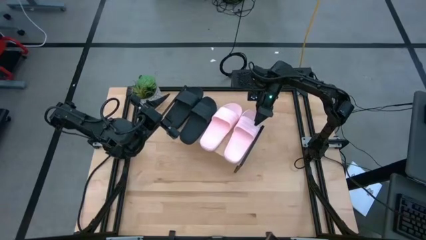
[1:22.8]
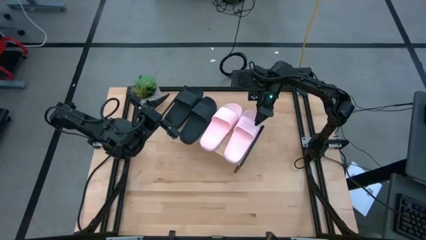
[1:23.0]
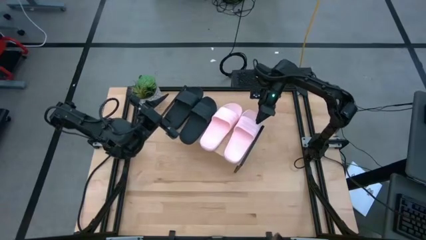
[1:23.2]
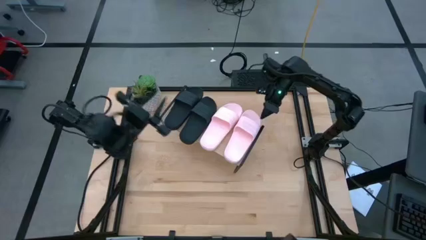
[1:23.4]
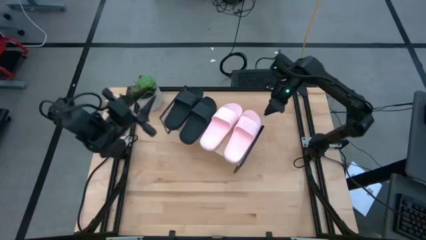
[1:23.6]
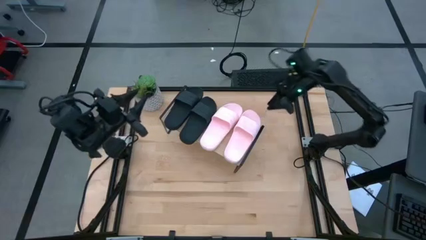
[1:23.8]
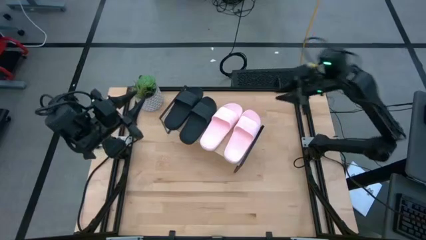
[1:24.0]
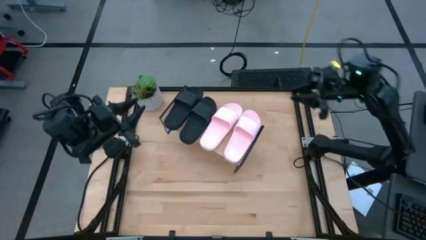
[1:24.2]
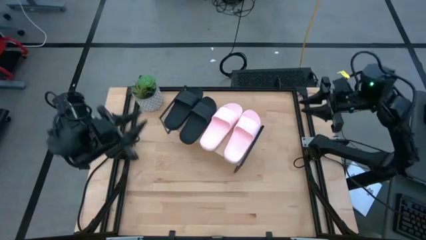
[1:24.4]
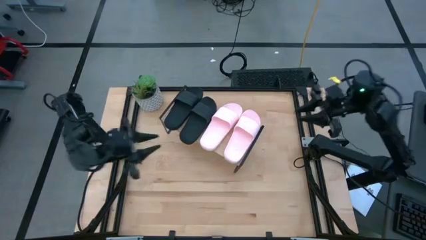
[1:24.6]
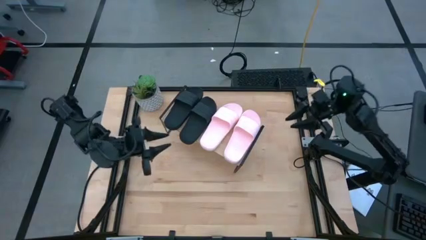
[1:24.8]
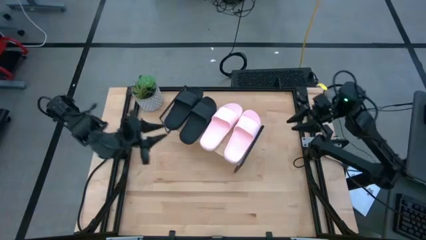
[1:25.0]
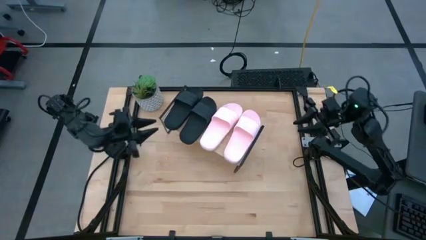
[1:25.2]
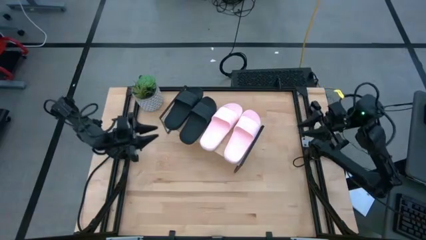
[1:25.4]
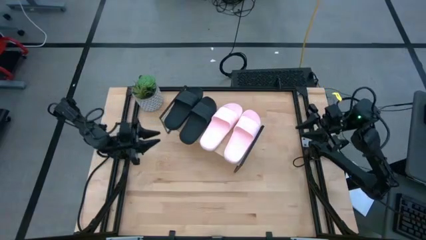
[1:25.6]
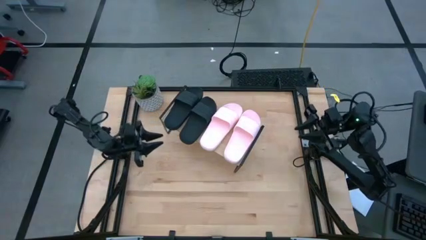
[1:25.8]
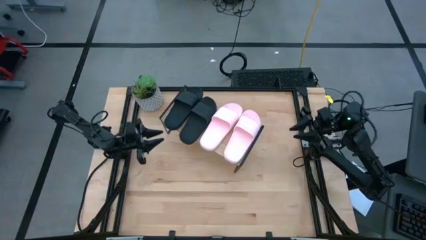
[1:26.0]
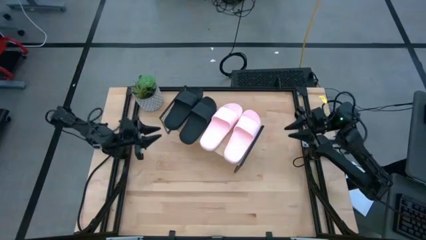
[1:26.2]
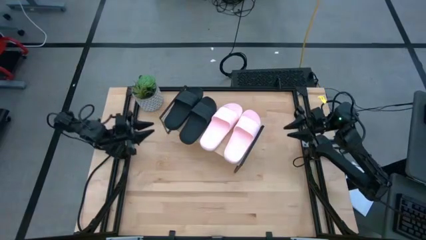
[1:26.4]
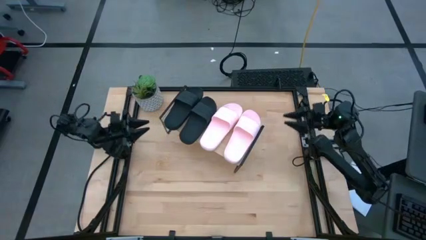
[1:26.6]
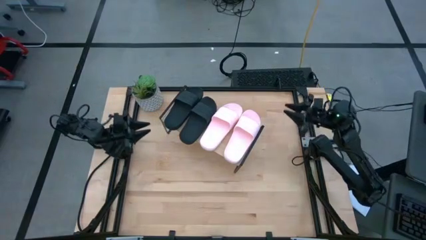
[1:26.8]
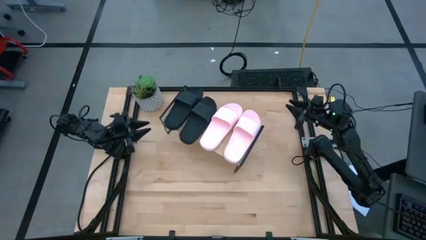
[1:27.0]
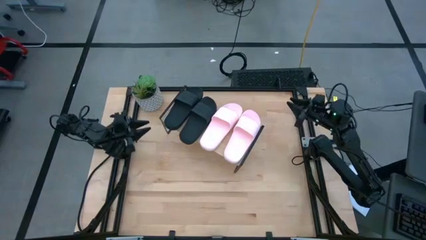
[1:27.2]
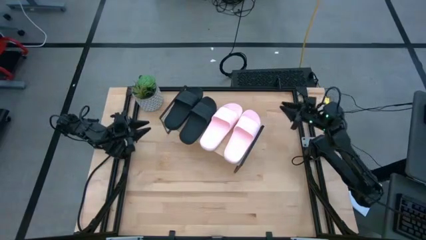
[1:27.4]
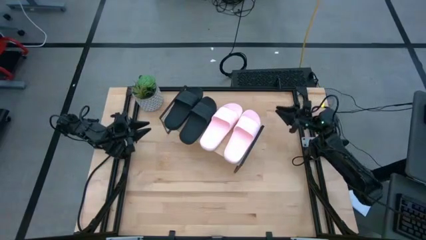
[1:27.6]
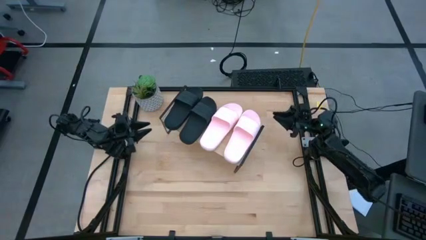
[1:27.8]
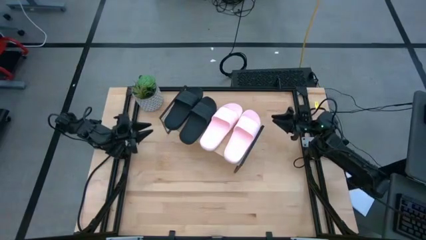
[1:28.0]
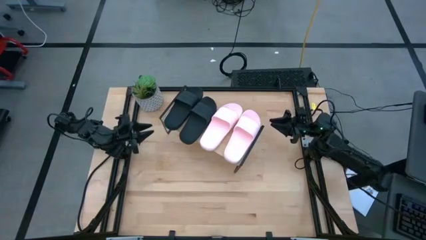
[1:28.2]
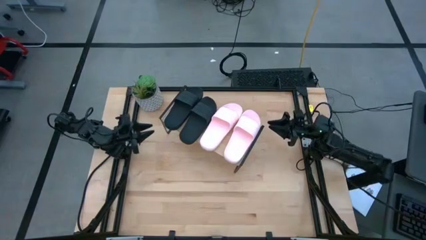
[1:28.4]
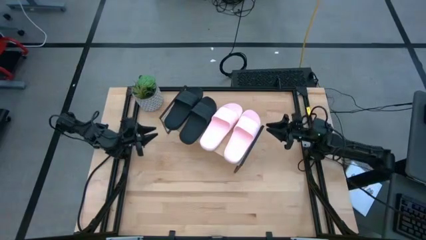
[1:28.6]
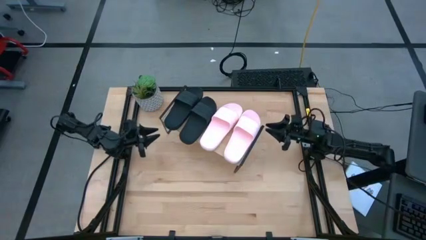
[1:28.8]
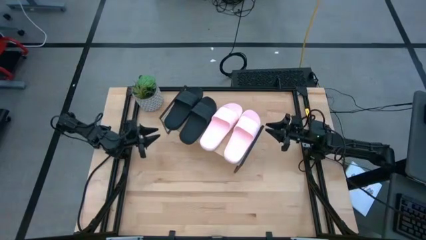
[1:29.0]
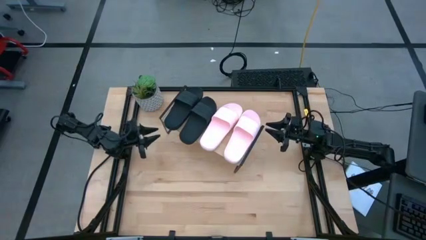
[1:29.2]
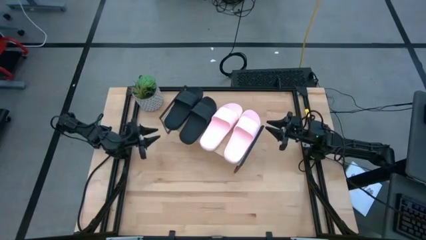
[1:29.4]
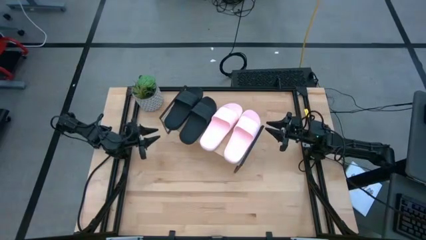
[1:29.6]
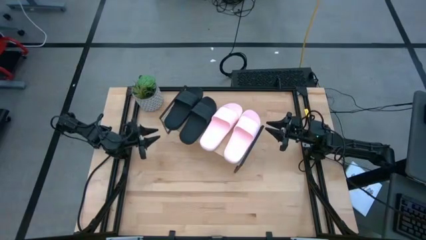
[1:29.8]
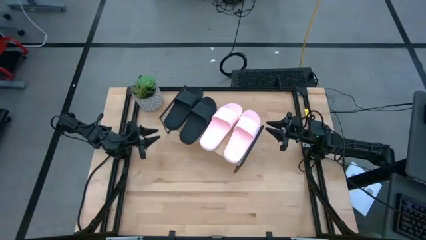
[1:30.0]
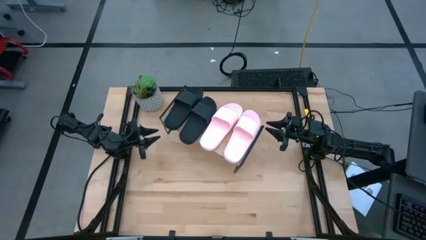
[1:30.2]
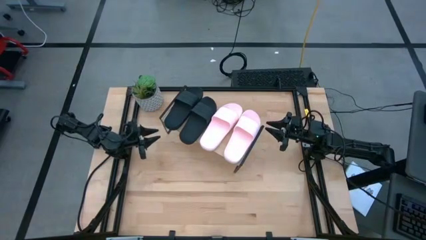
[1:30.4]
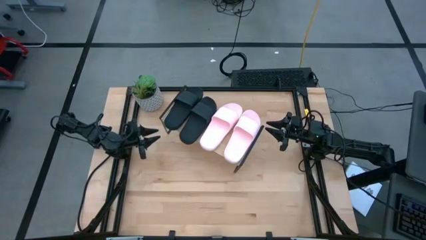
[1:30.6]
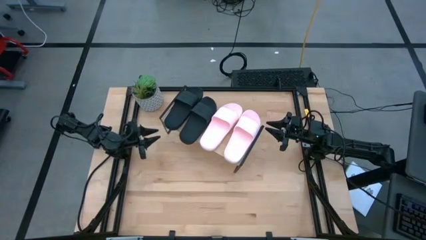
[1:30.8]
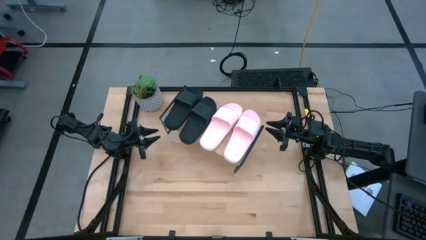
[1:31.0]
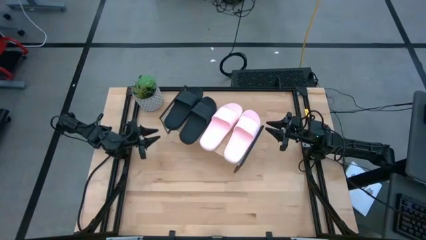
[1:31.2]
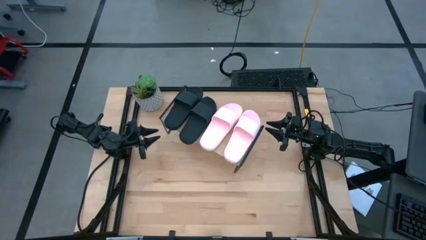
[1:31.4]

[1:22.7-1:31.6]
Task: Pick and place slides into the shelf
Return to Home Position

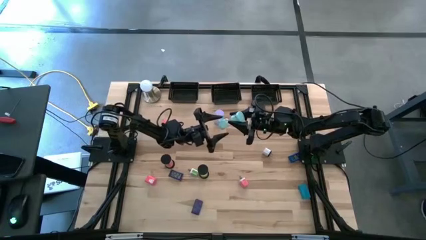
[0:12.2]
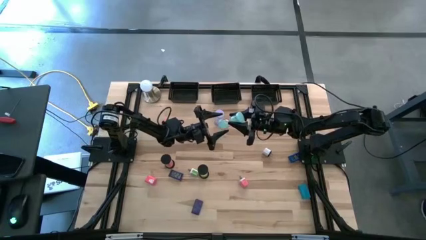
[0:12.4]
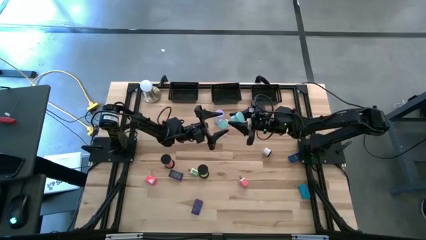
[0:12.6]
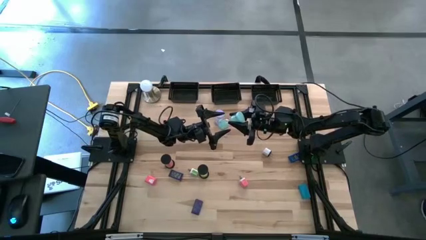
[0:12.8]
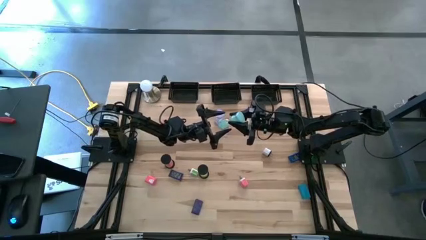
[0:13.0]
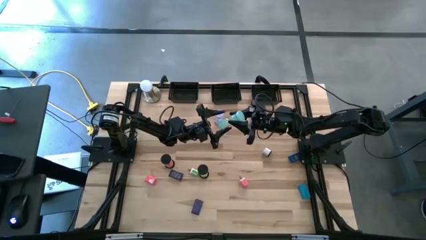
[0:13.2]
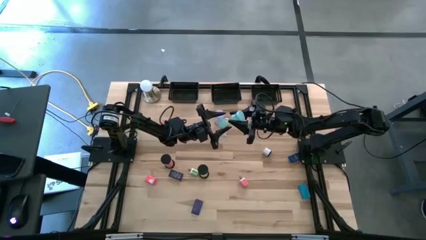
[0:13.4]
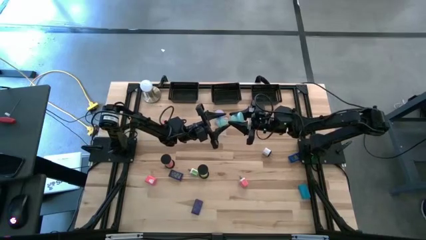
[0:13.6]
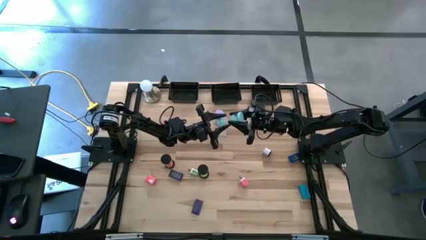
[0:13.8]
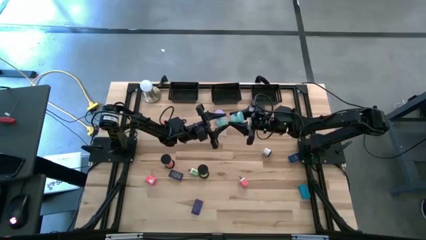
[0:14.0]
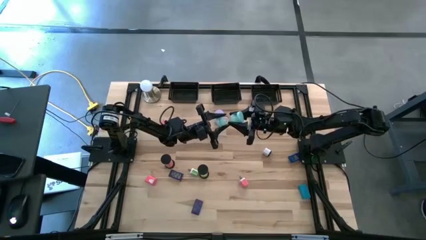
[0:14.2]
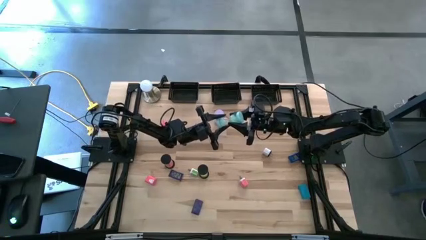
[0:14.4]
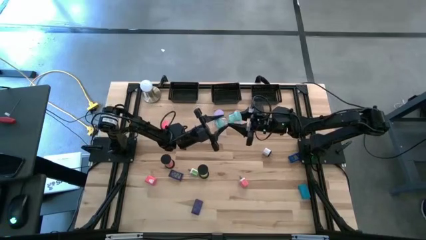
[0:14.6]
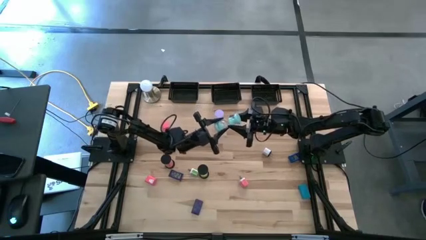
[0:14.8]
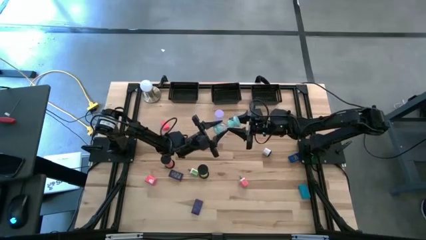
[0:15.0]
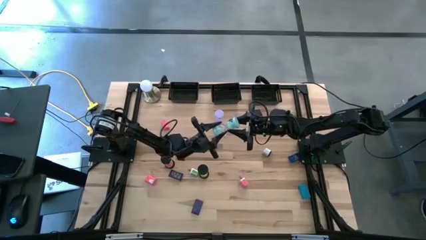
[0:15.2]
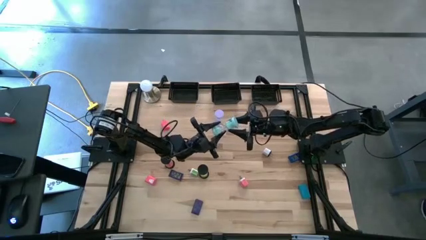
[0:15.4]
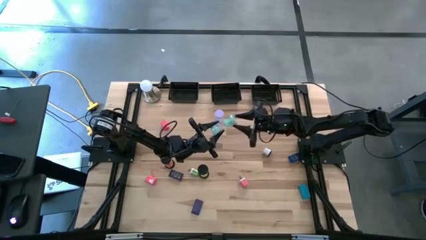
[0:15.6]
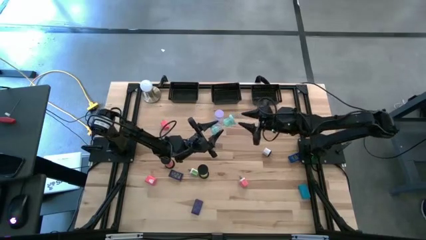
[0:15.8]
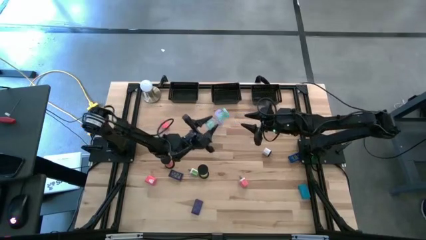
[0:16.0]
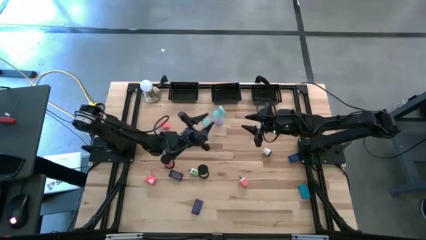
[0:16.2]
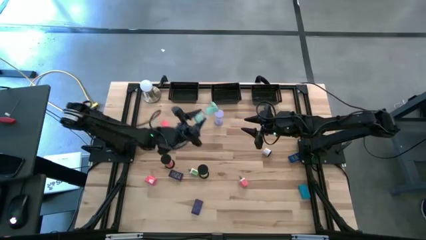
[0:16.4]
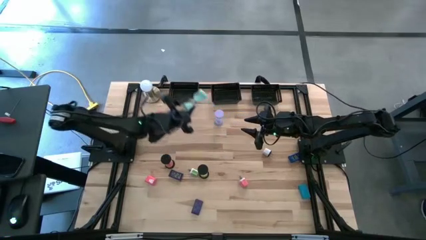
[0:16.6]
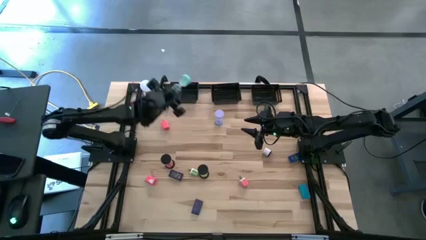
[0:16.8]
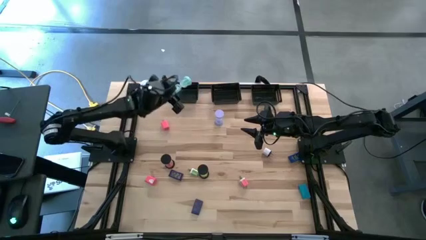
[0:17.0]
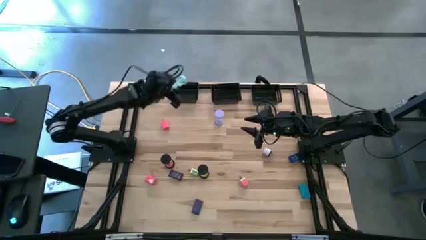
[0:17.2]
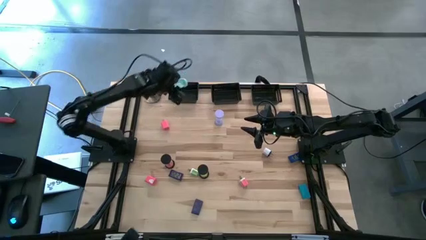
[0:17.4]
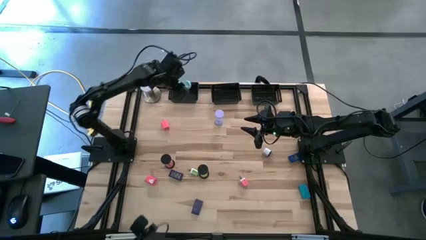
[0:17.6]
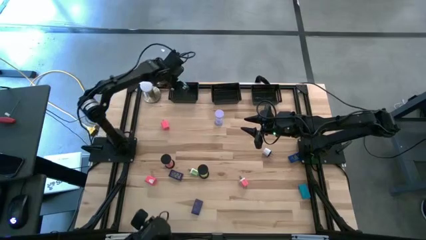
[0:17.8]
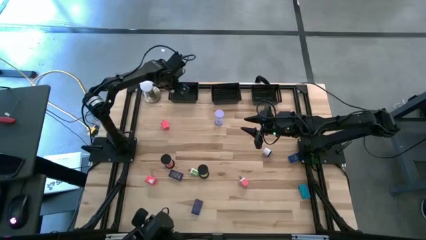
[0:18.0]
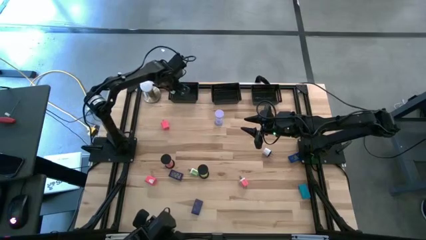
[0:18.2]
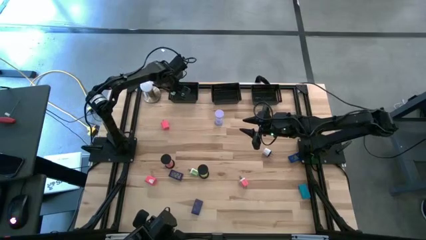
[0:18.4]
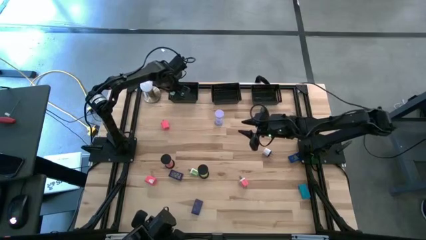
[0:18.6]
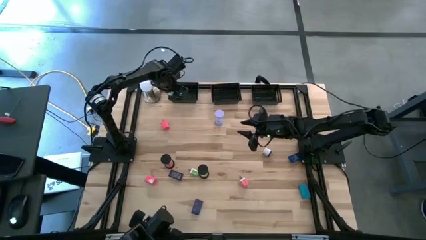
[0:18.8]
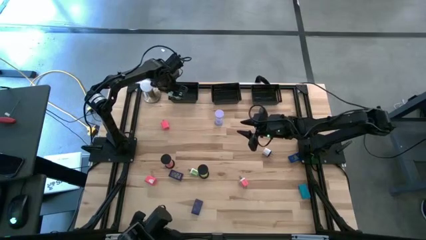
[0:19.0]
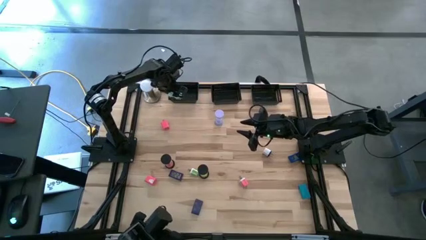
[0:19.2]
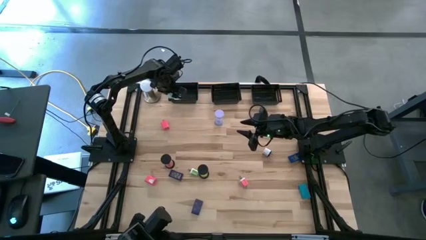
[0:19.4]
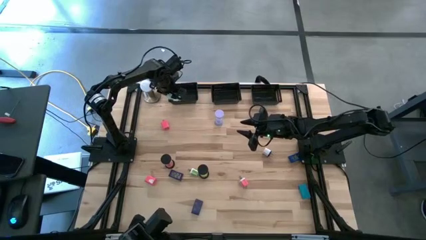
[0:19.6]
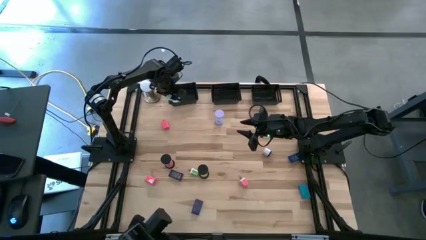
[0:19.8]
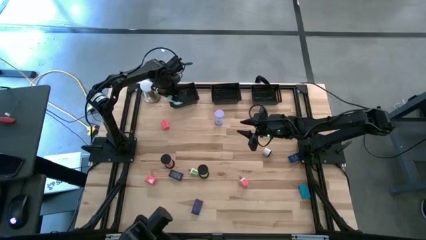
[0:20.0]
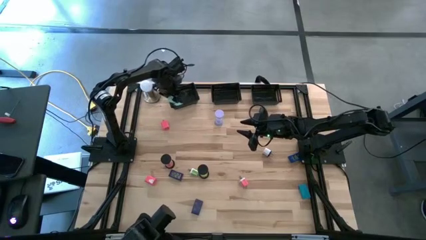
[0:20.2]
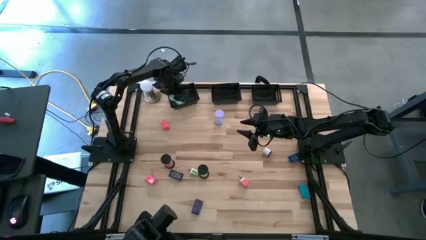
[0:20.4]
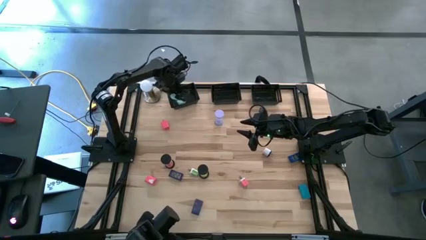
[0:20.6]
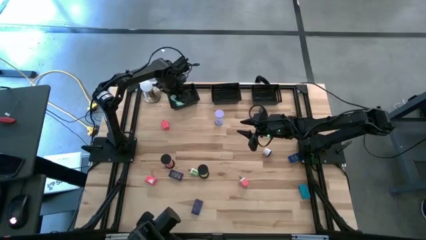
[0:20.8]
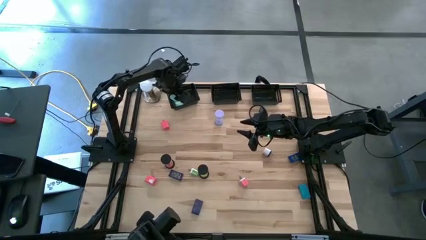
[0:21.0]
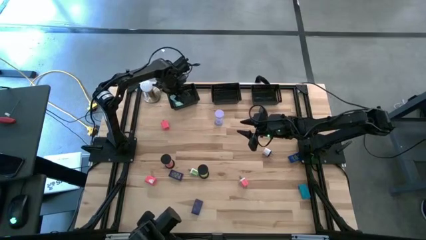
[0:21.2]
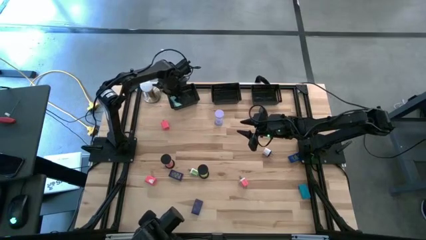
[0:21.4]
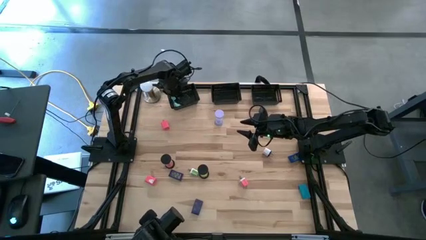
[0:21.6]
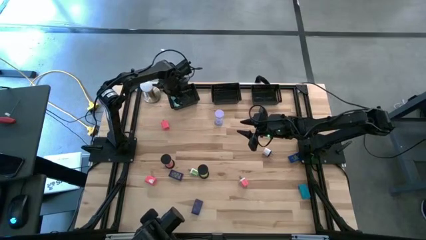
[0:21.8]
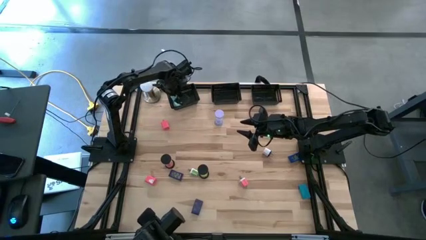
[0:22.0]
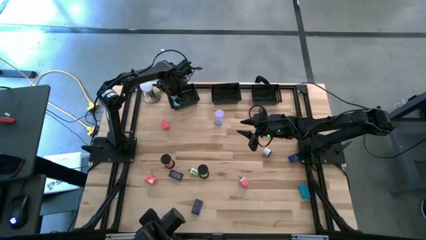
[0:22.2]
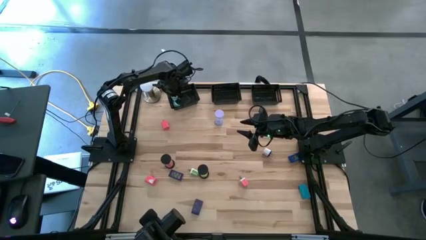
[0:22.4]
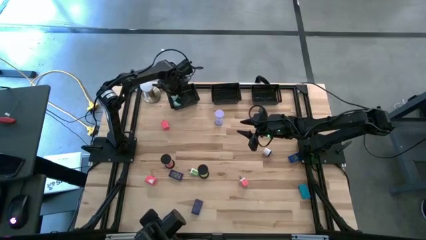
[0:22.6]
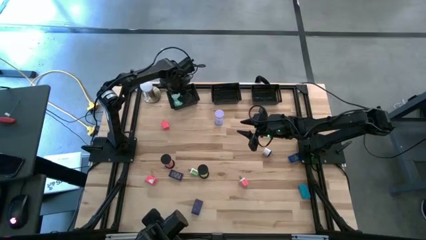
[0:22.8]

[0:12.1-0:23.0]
Task: Pick & Place Office items
Put the light green hourglass into the left black bin
